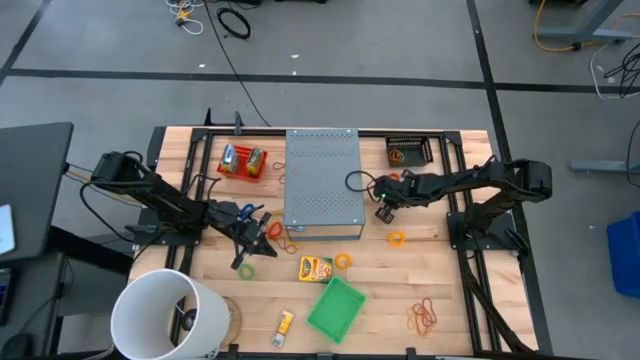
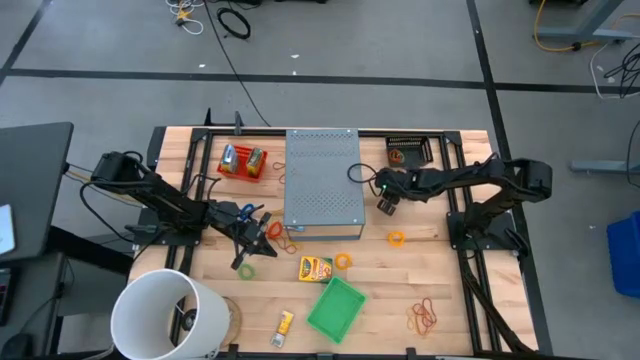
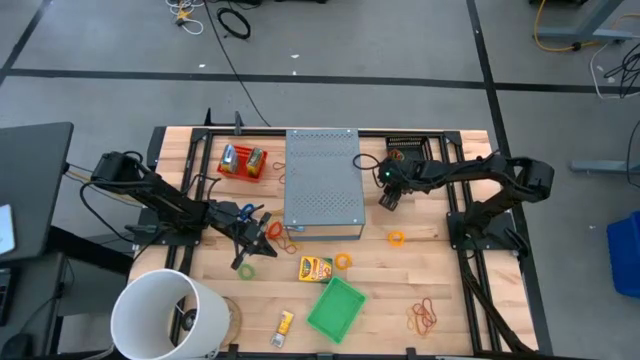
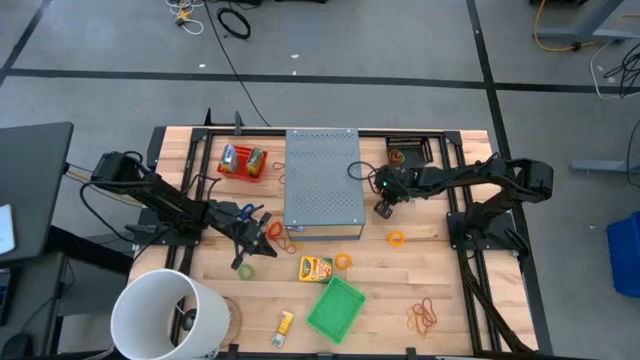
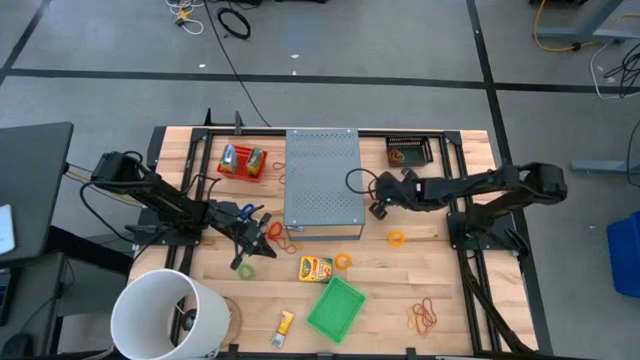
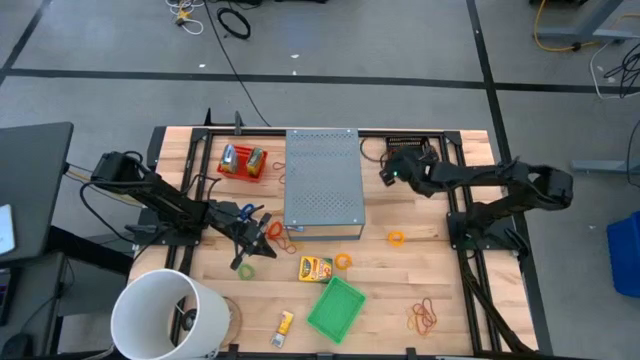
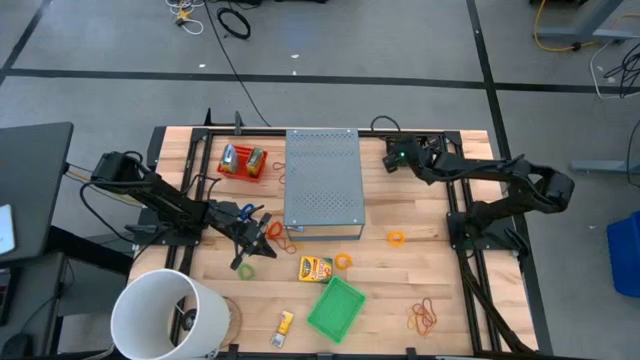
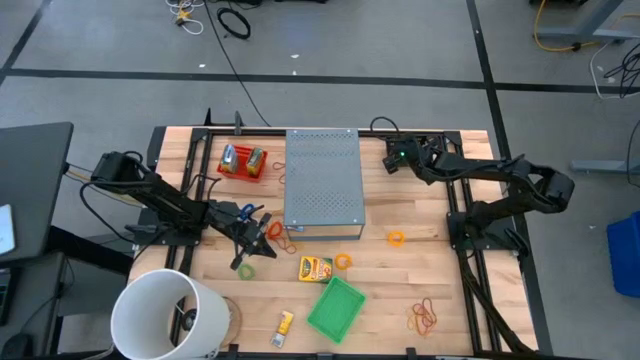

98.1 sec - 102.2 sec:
Task: Pick & Place Office Desk Supplies
Put the orange spring keychain into the black basket

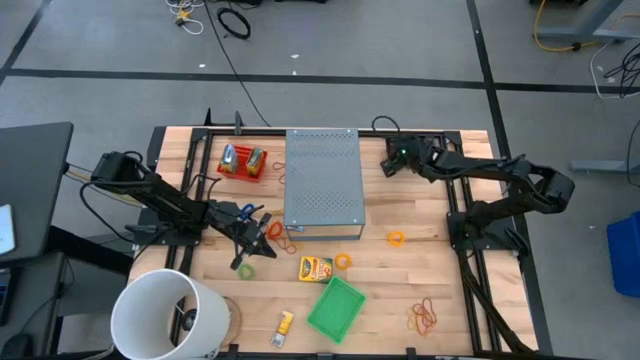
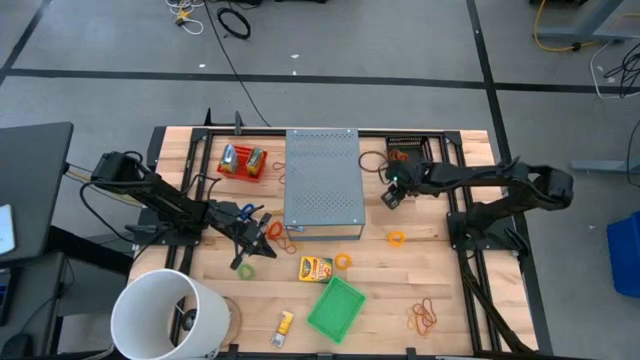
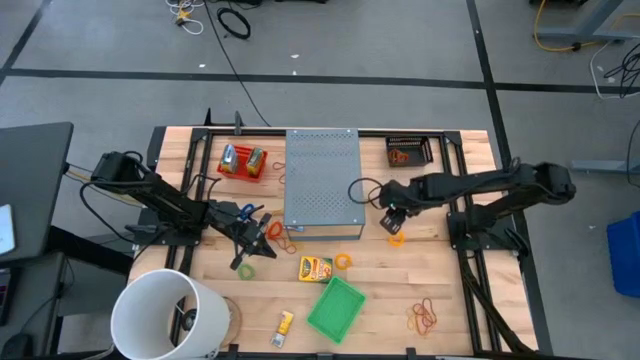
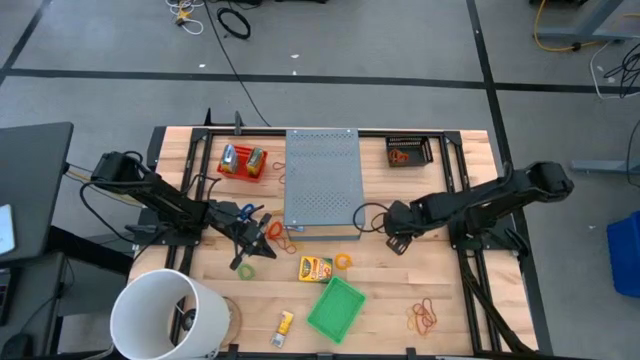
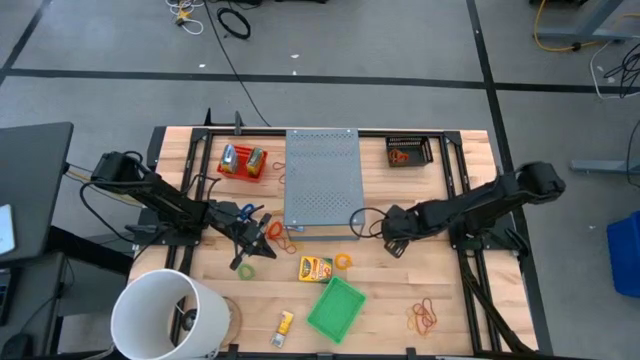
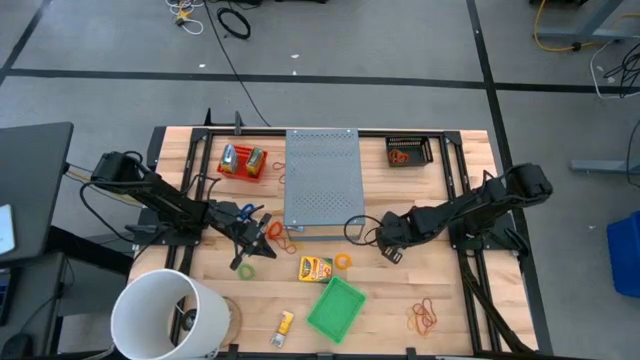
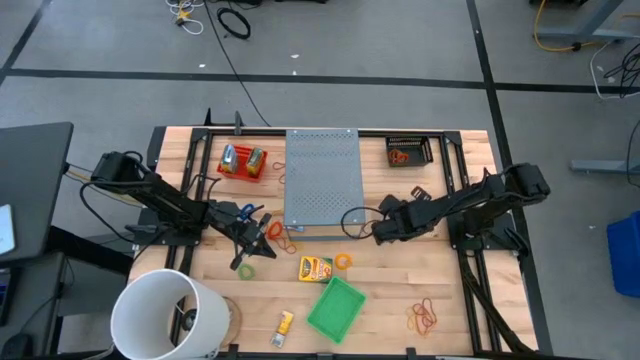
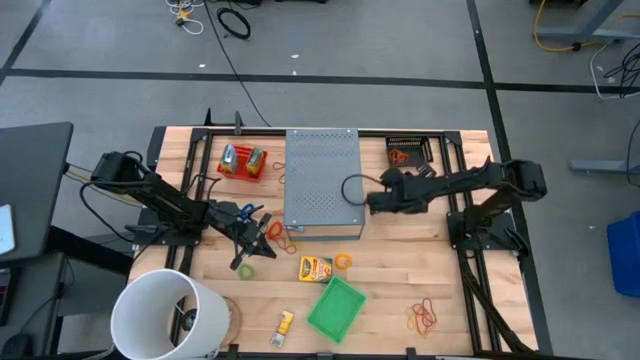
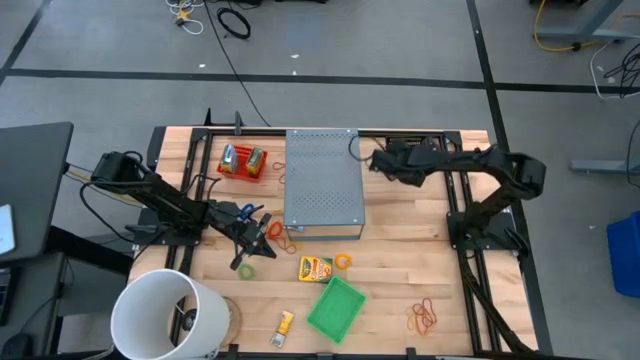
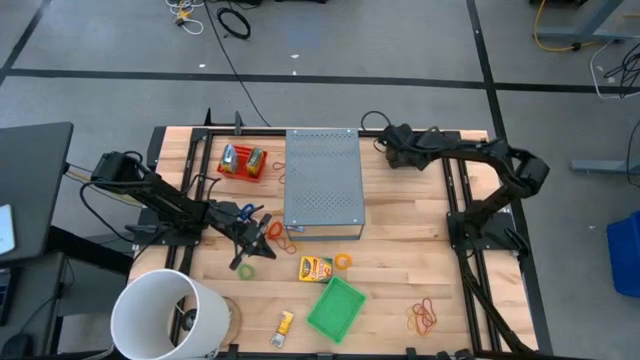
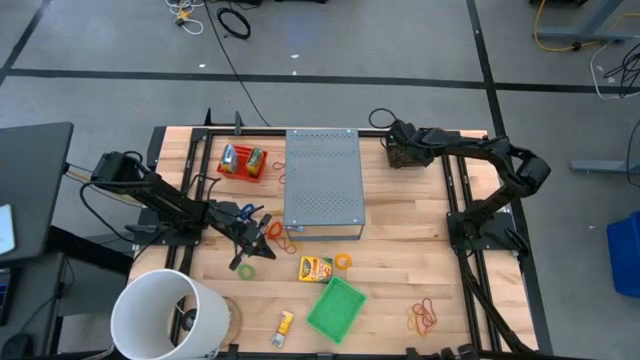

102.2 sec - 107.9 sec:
Put the yellow spring keychain into the black basket

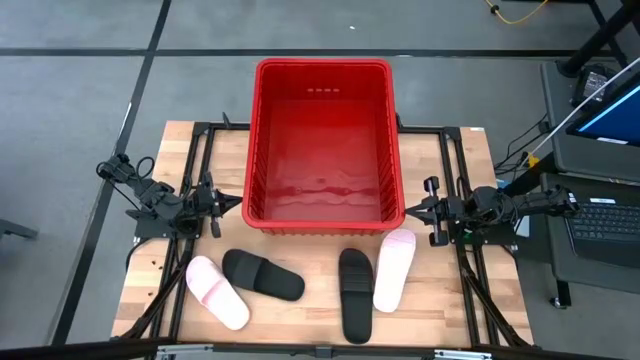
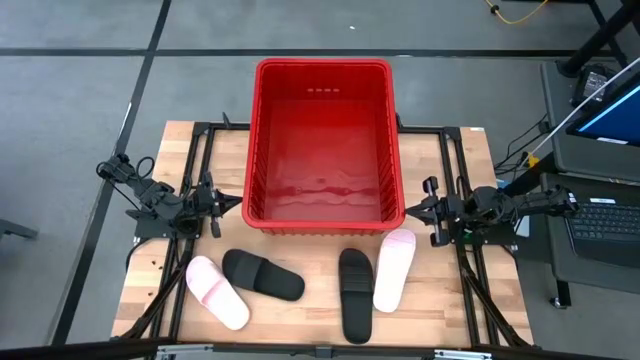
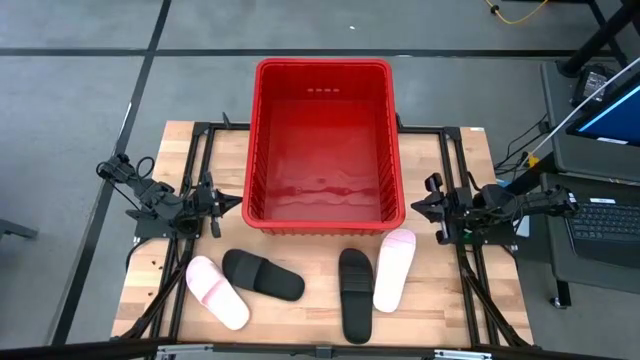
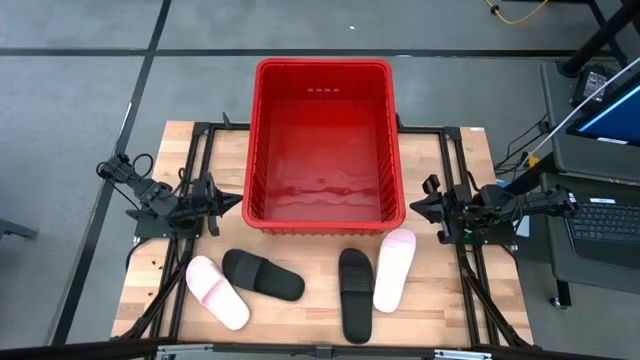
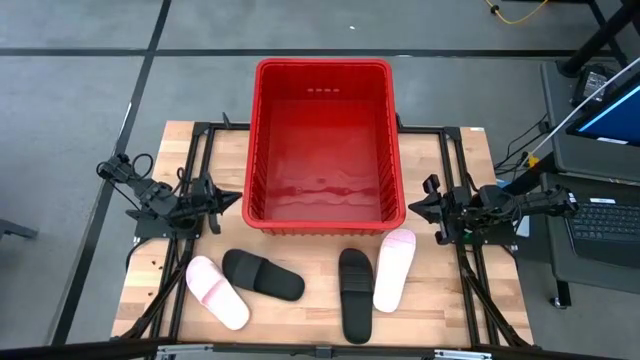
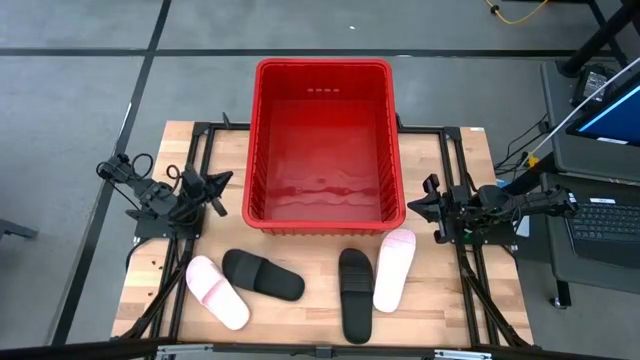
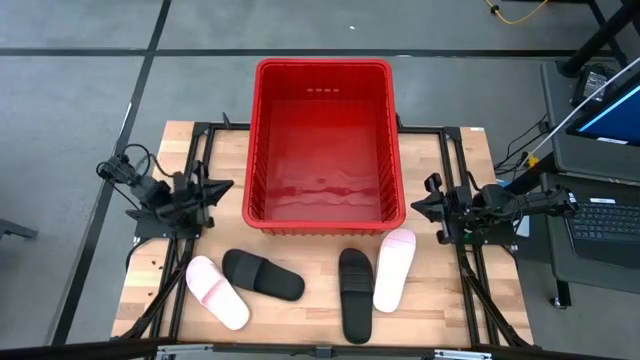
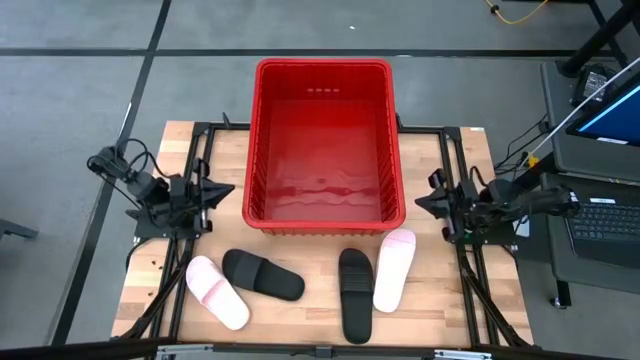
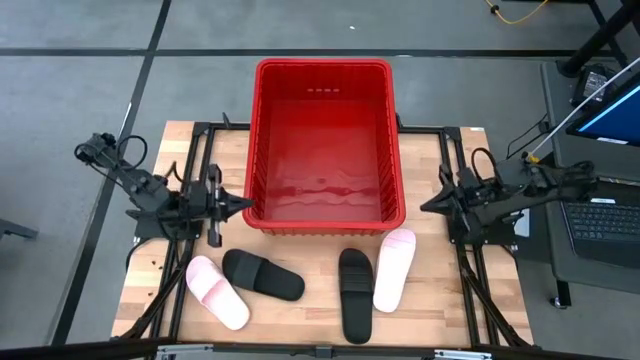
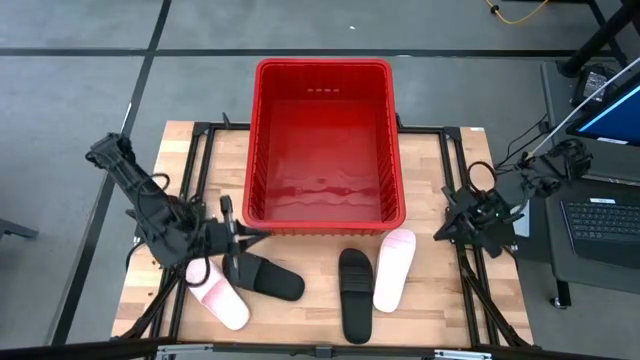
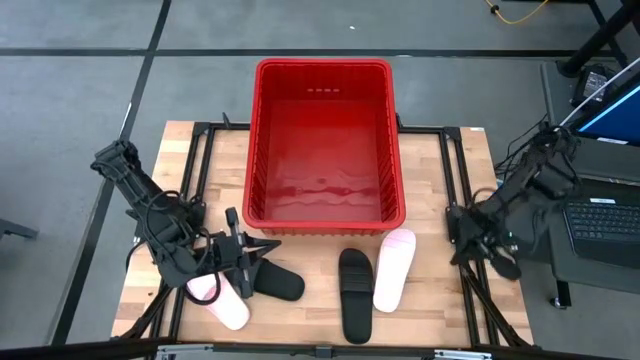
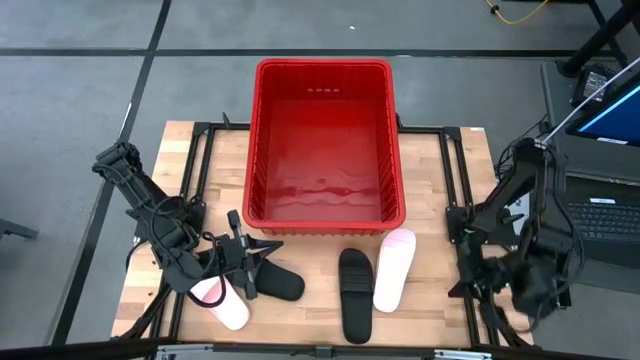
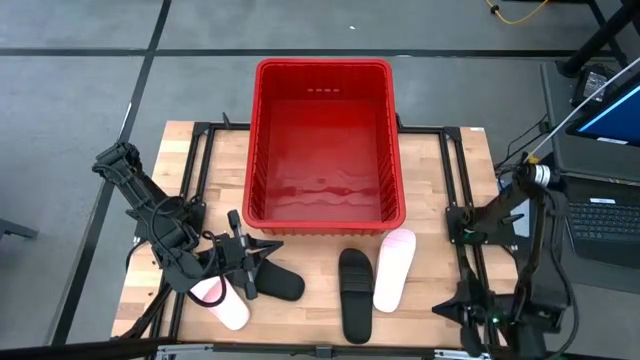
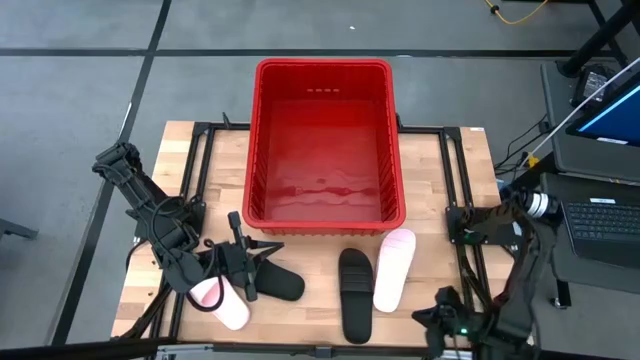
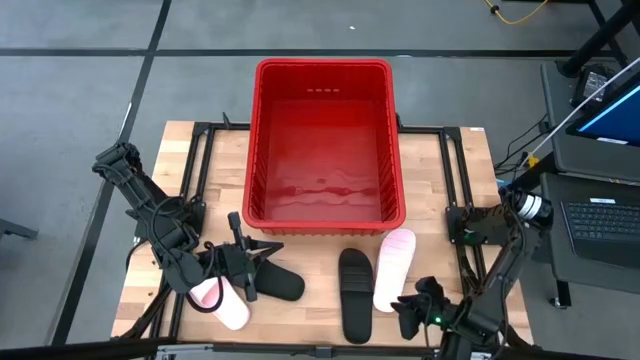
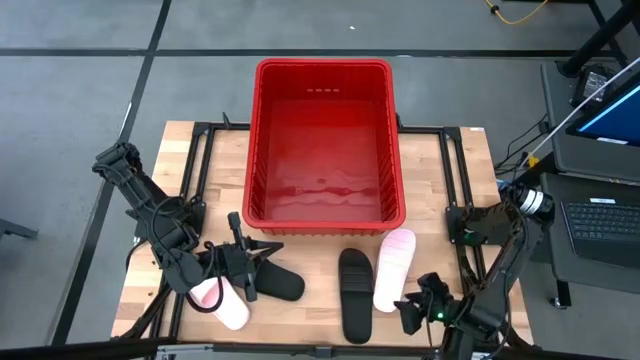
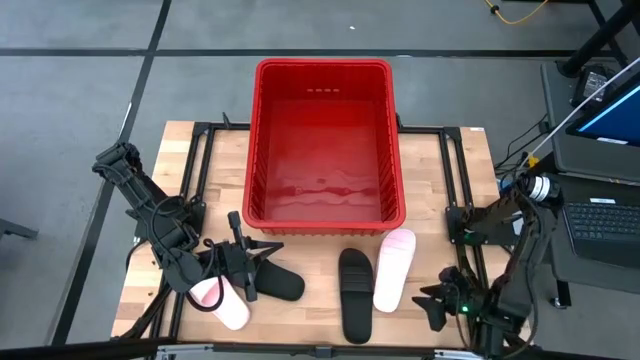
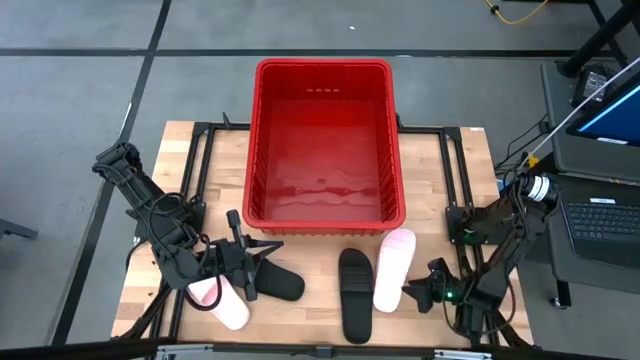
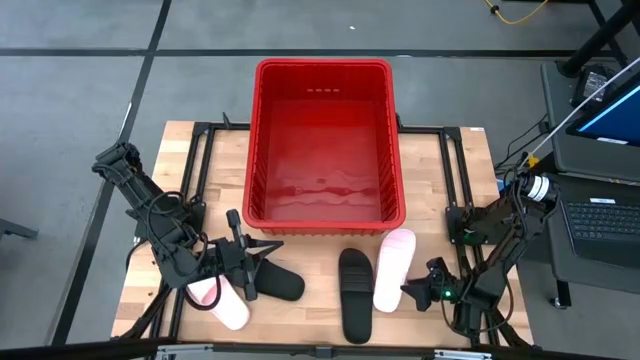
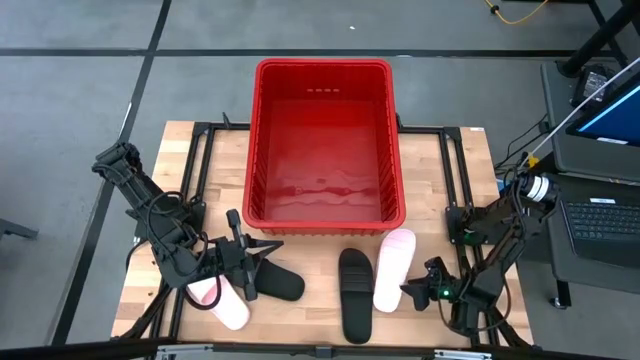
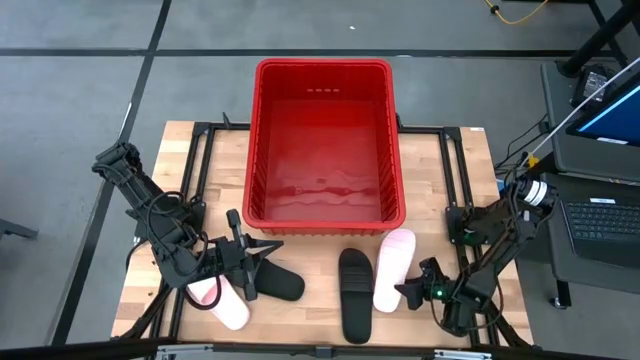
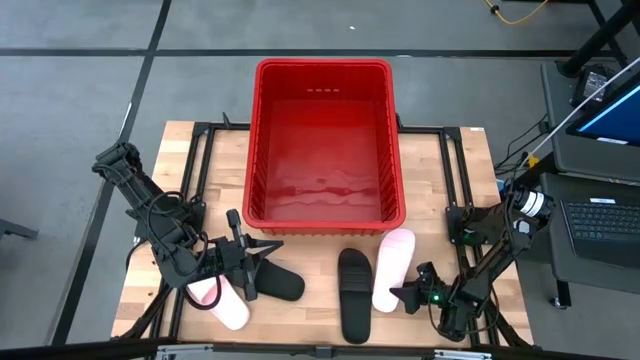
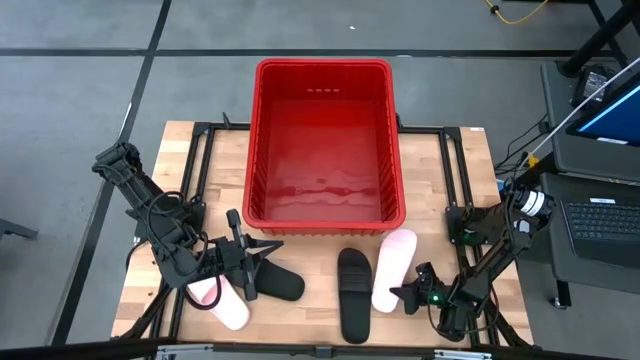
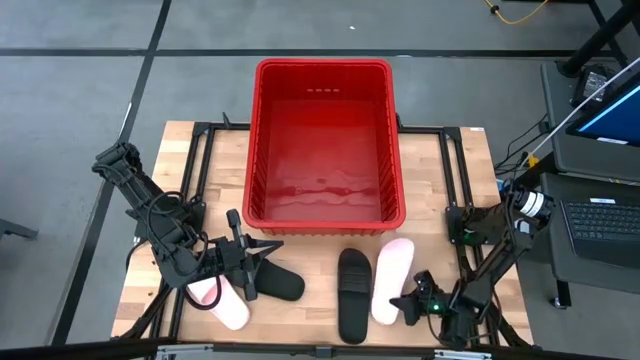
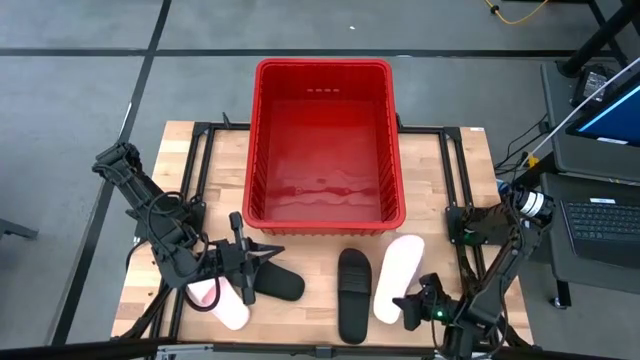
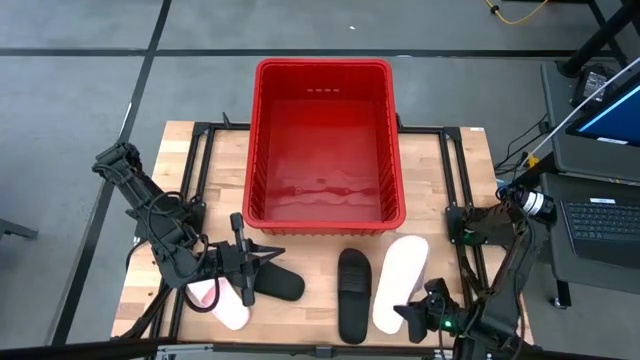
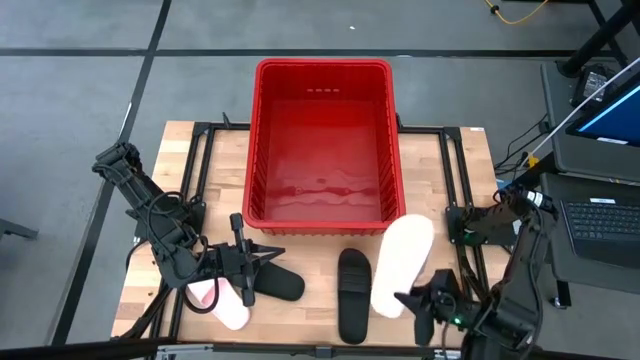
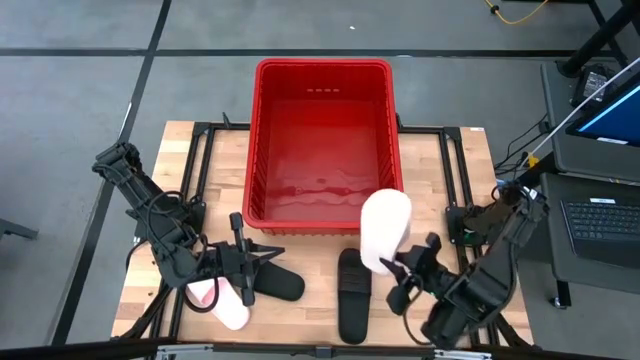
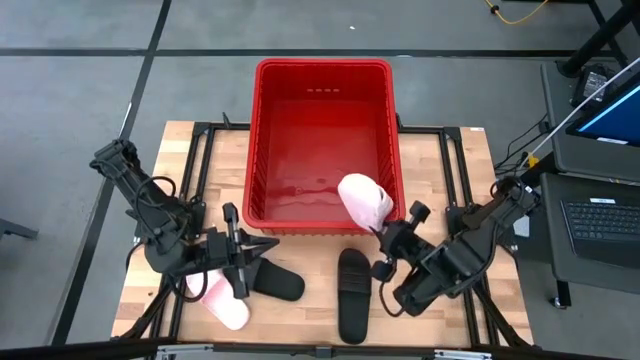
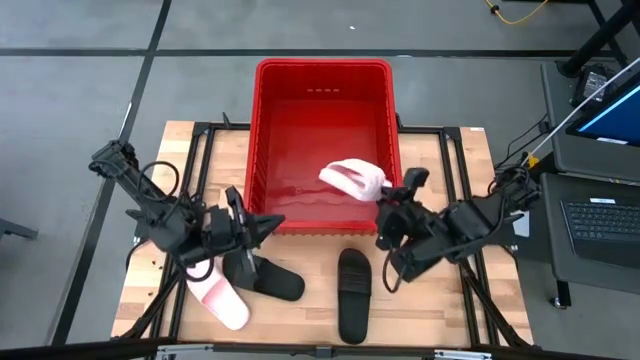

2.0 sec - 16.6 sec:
Task: Pick and place slides into bin
Put the right pink slide into the bin
